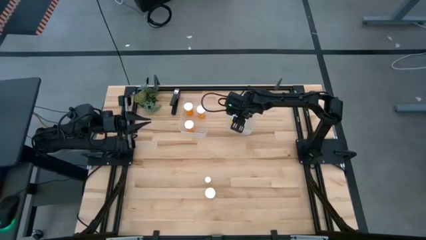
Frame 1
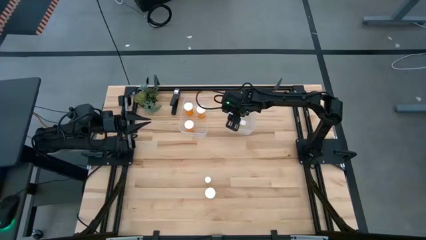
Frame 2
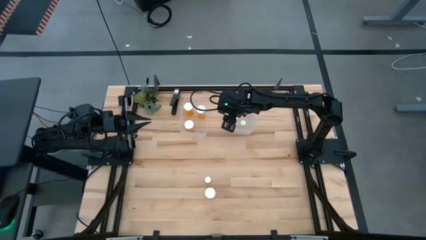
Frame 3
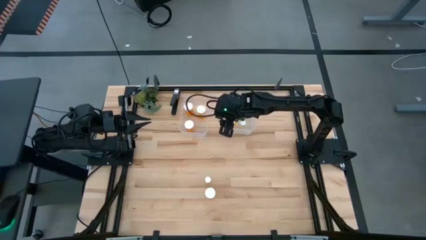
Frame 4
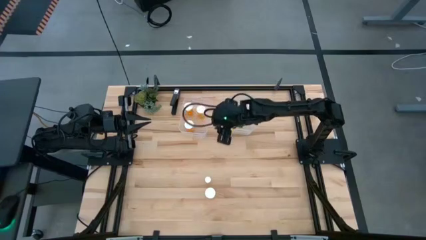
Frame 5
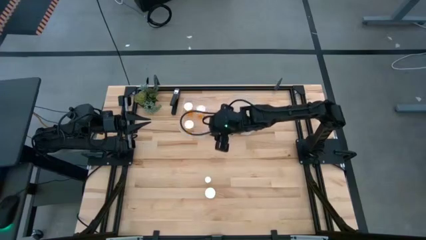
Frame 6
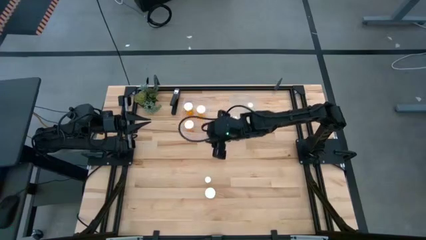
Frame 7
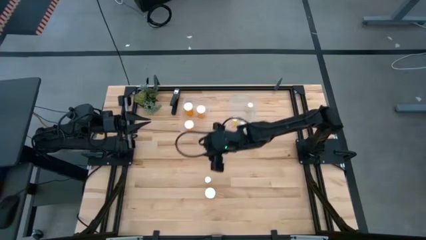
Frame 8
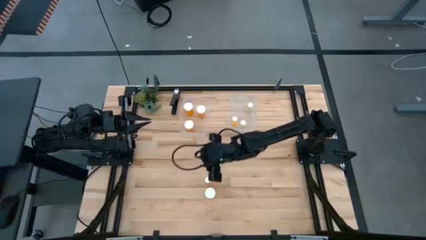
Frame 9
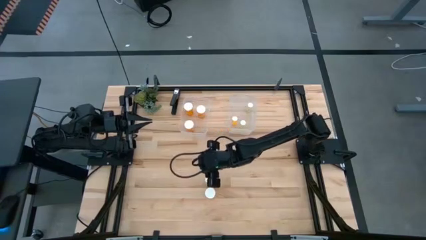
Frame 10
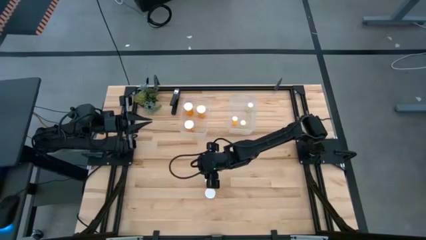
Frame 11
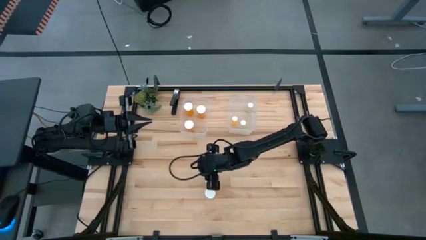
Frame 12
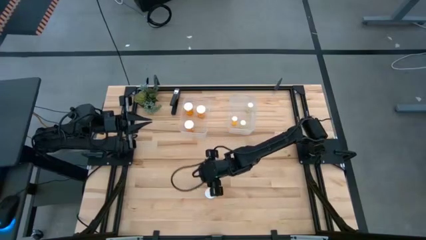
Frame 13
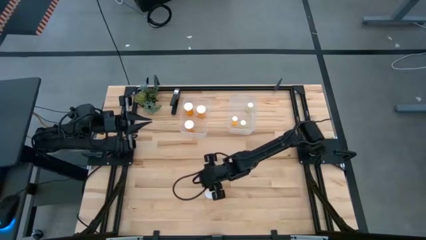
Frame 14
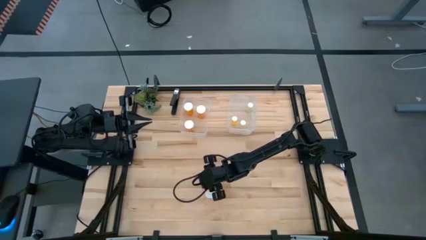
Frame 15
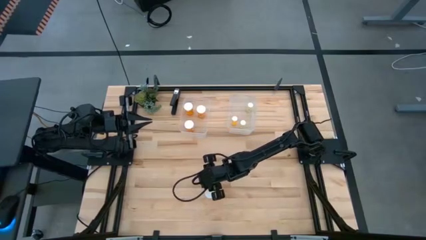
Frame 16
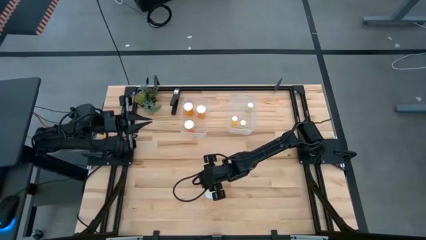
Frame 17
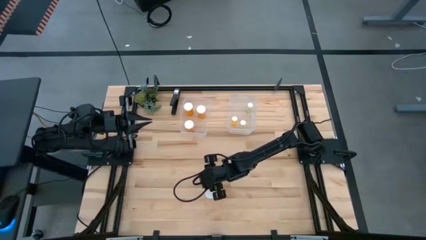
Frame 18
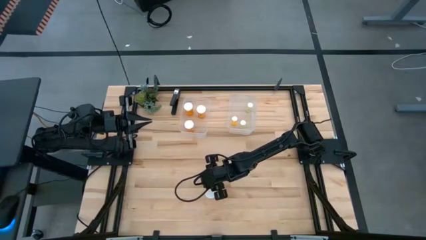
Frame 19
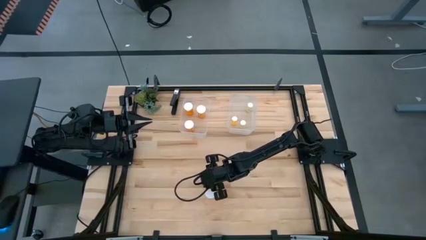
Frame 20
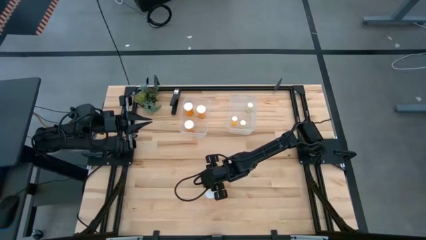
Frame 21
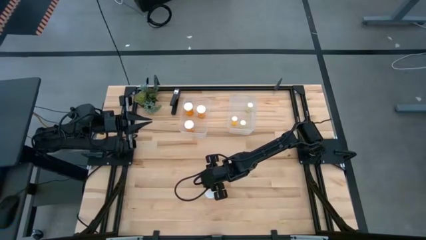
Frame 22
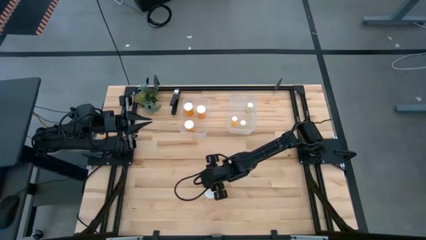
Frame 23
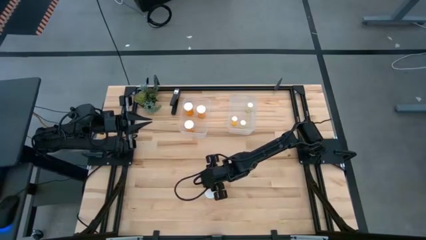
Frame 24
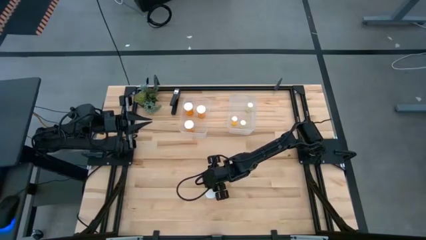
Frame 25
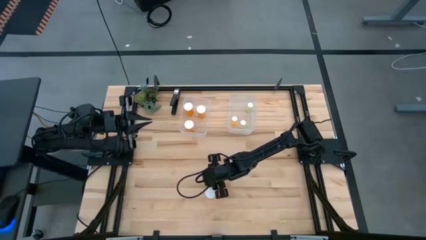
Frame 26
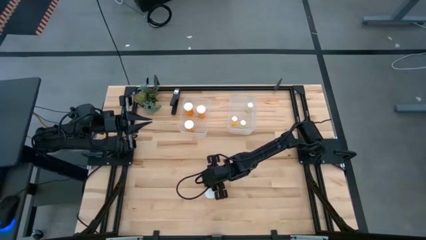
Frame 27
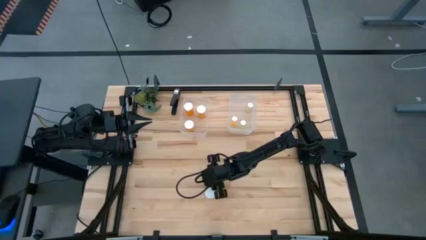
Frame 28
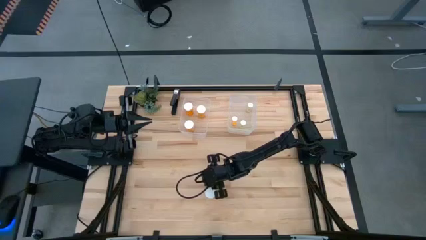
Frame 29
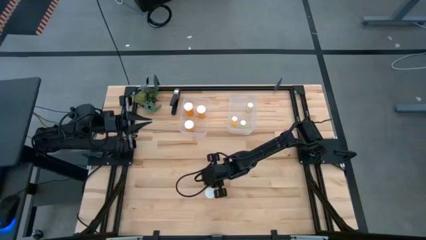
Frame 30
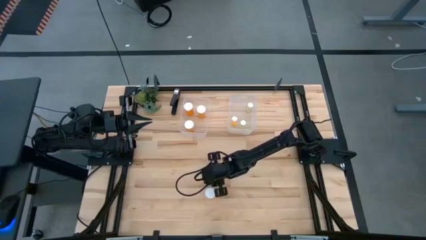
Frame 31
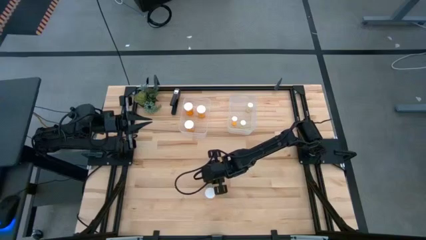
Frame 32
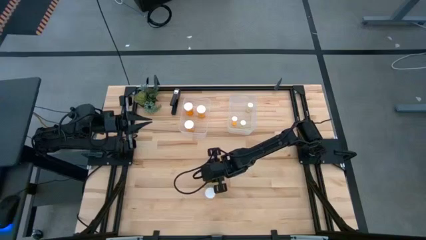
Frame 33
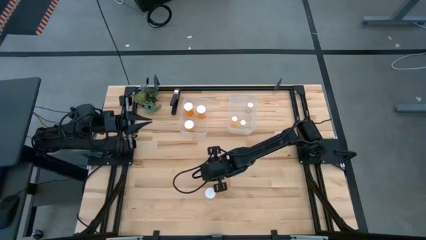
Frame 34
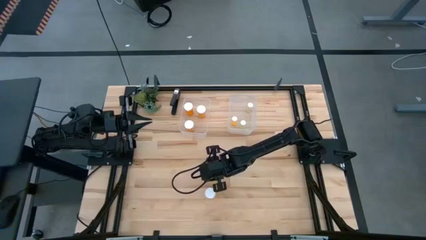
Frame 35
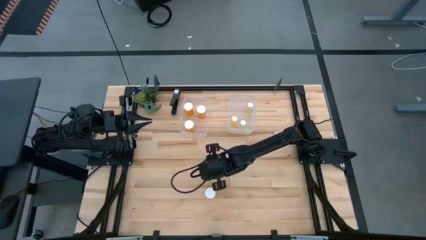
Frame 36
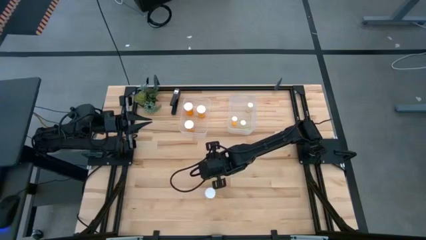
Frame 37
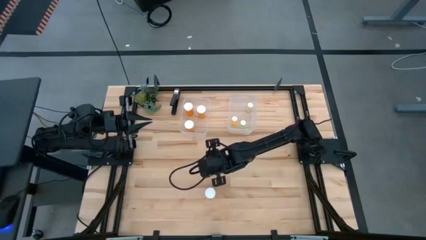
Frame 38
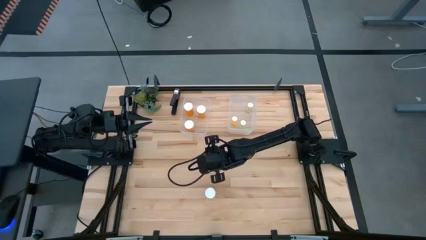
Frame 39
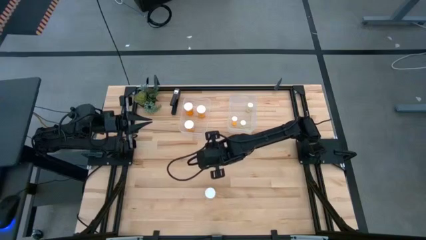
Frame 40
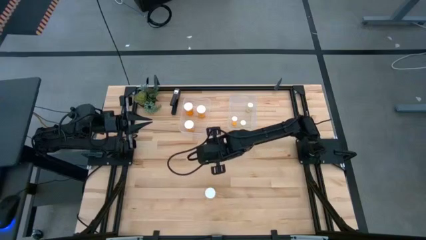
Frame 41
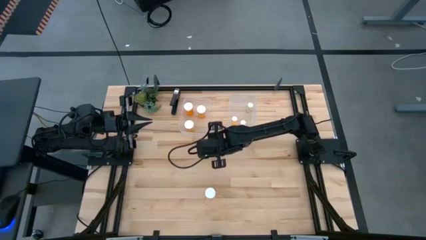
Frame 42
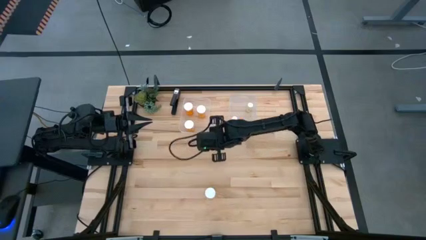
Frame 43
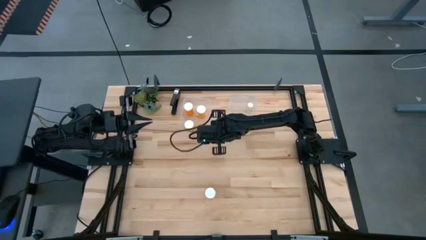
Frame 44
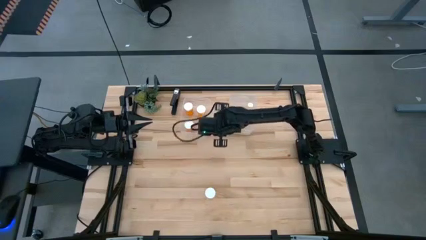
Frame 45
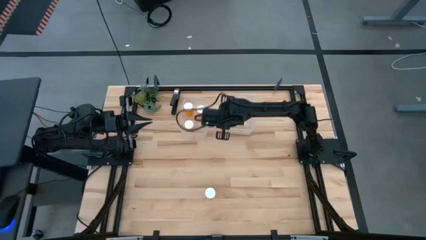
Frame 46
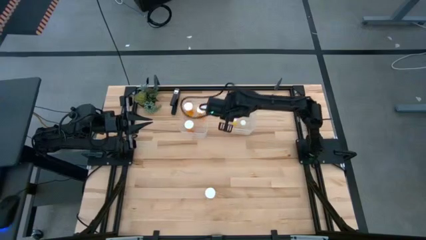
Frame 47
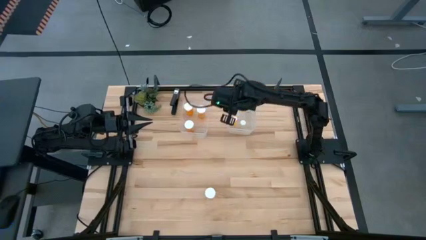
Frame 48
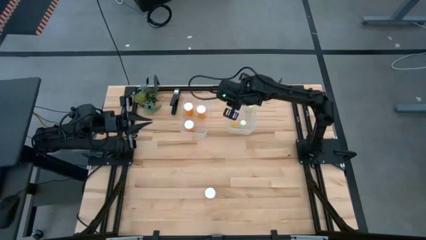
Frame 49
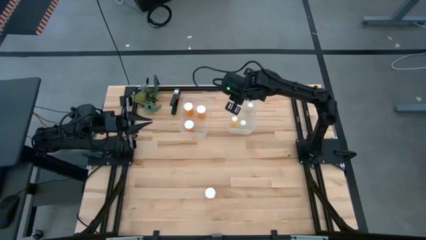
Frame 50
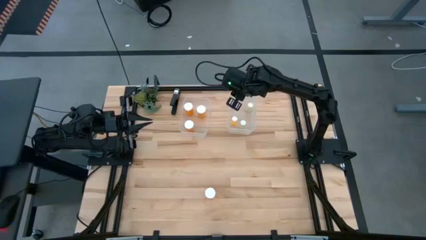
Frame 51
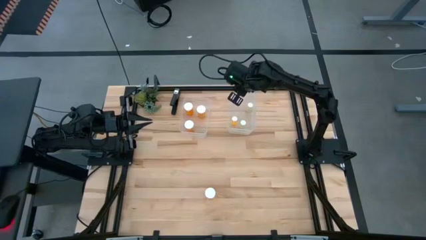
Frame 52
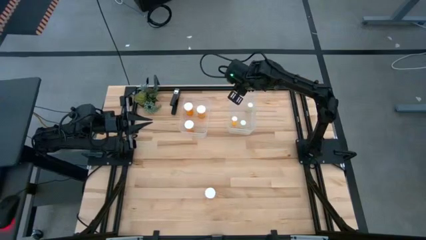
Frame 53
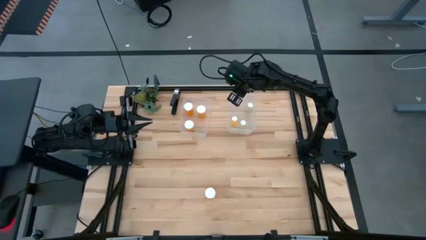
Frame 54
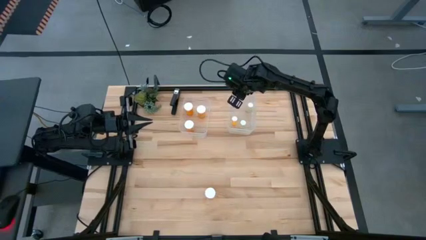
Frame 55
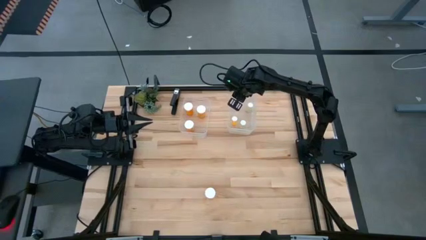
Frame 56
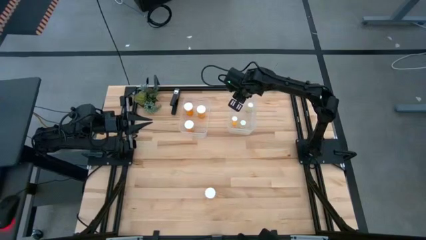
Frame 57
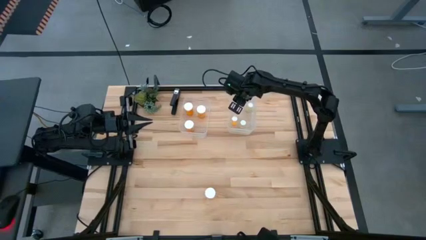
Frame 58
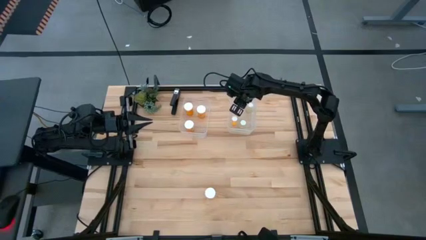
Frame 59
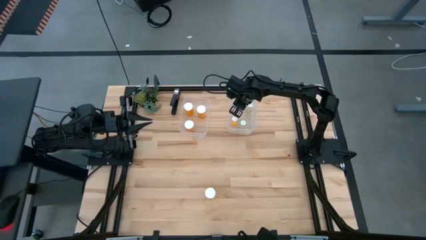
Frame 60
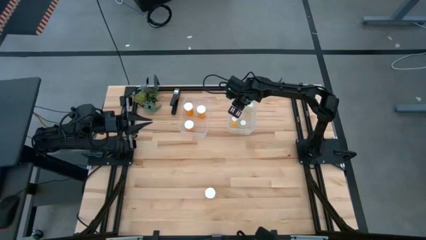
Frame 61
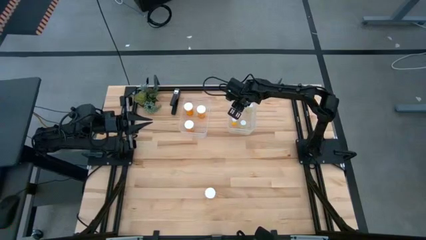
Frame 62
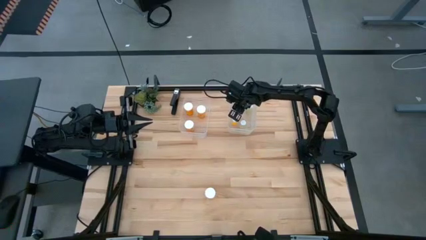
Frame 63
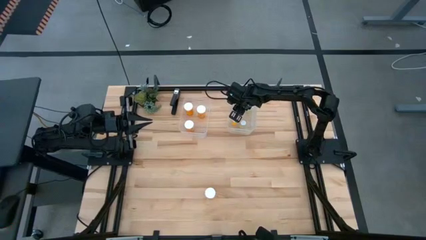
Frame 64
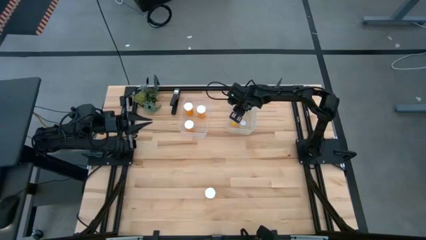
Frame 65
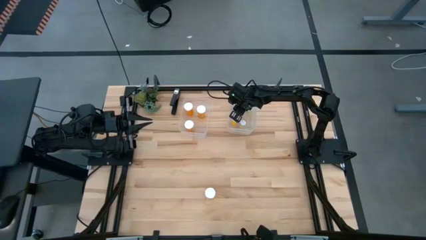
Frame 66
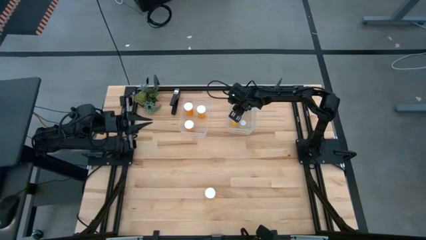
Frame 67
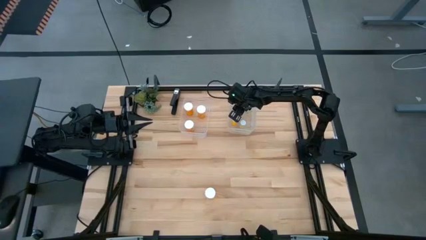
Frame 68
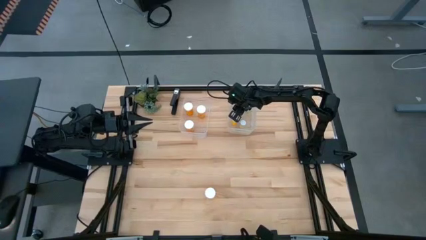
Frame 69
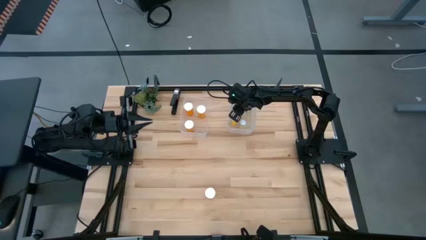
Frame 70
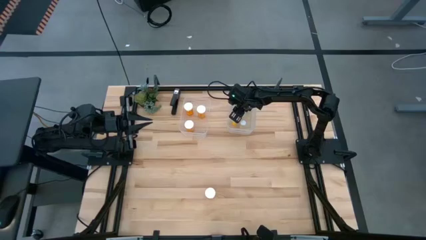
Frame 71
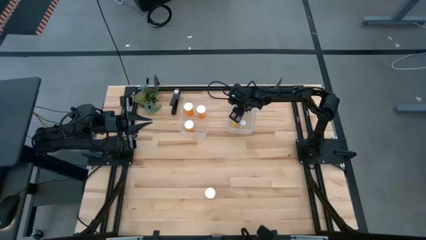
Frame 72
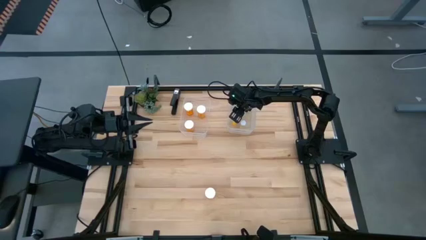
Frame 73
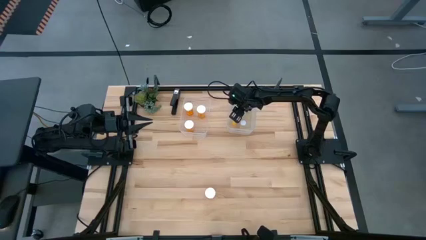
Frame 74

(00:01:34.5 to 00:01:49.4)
Task: Pick and place medicine bottles into bin by pill shape (circle, oval)
Put the small yellow pill bottle in the right transparent bin
